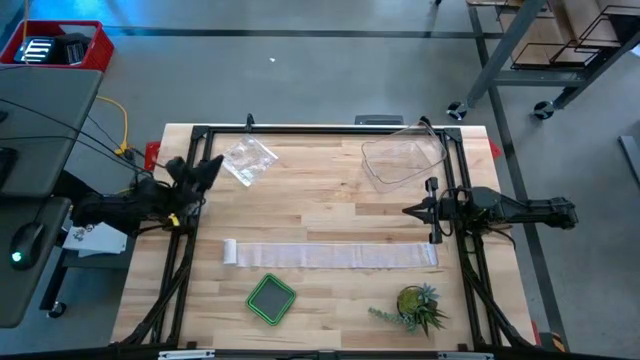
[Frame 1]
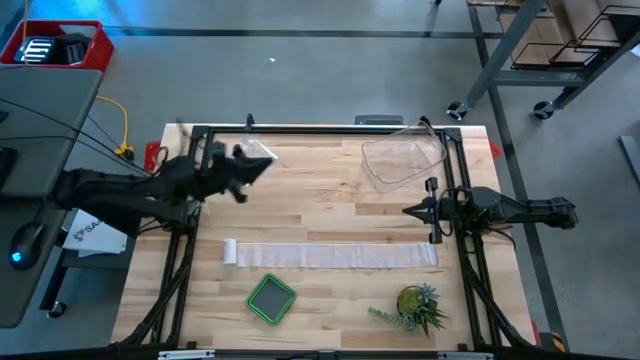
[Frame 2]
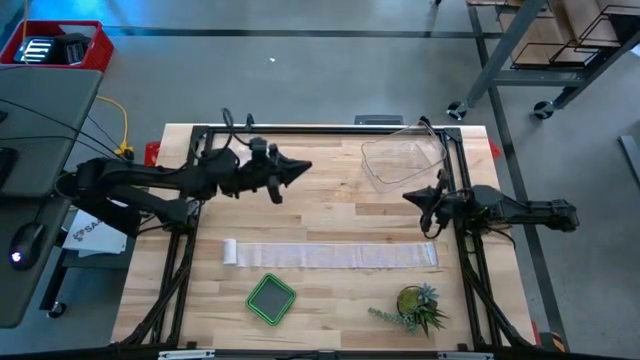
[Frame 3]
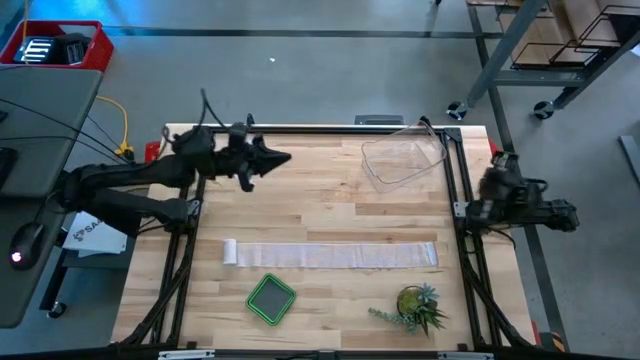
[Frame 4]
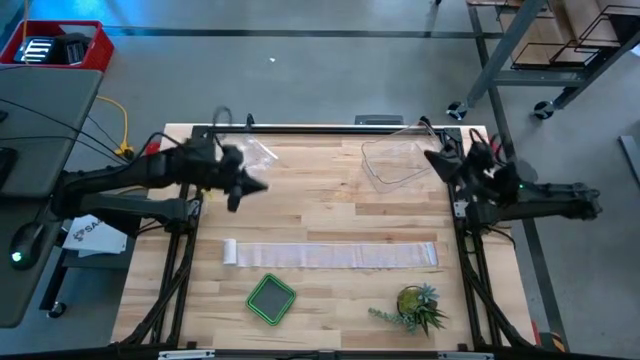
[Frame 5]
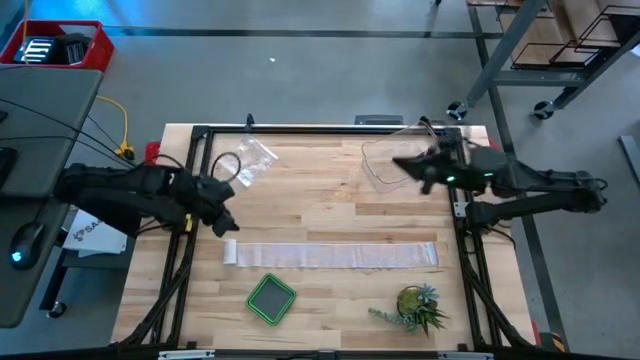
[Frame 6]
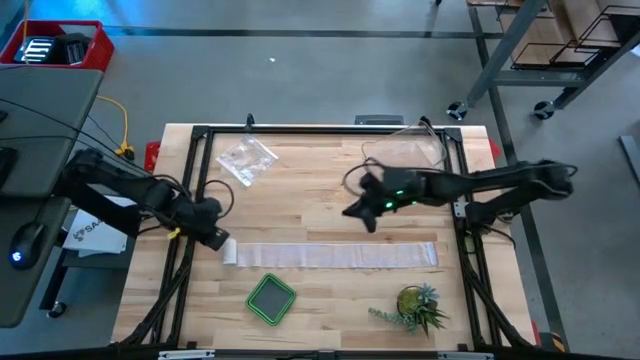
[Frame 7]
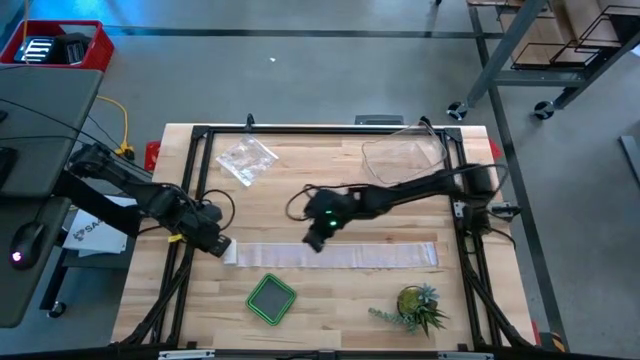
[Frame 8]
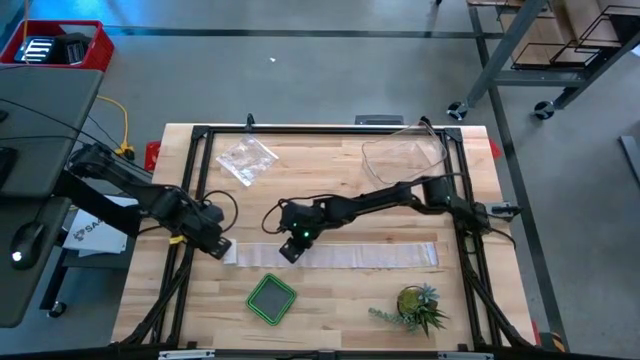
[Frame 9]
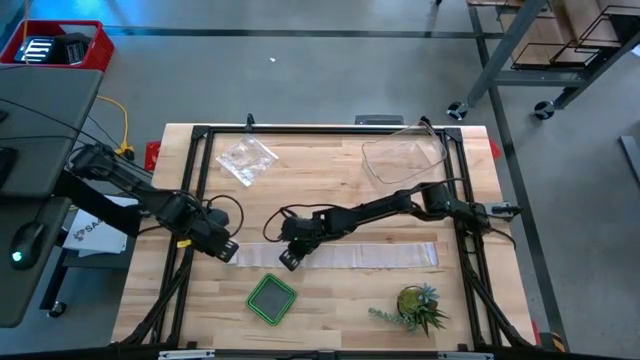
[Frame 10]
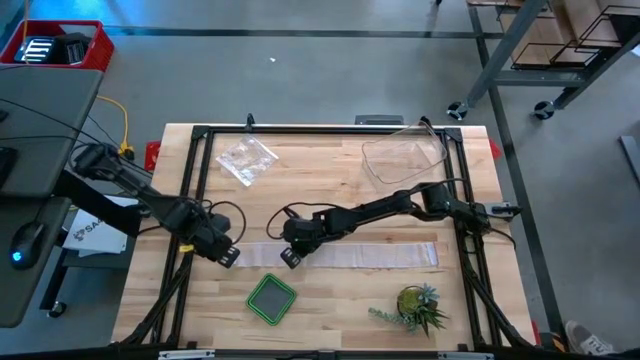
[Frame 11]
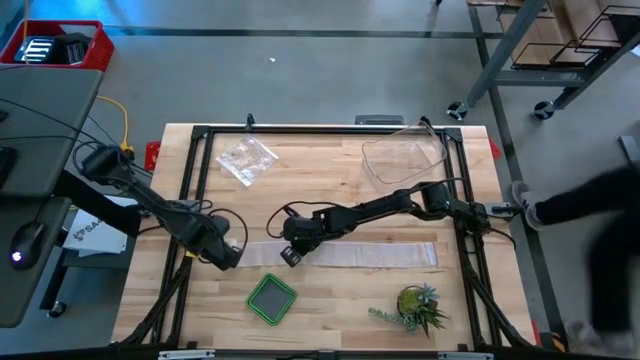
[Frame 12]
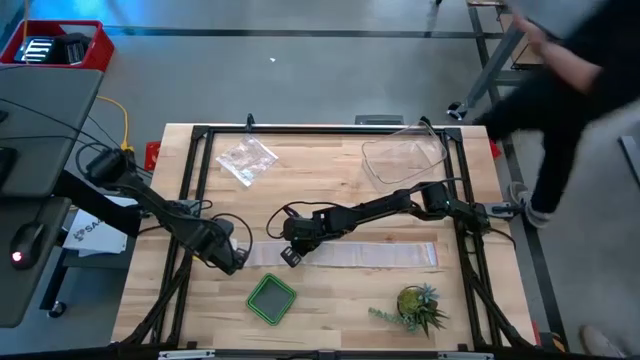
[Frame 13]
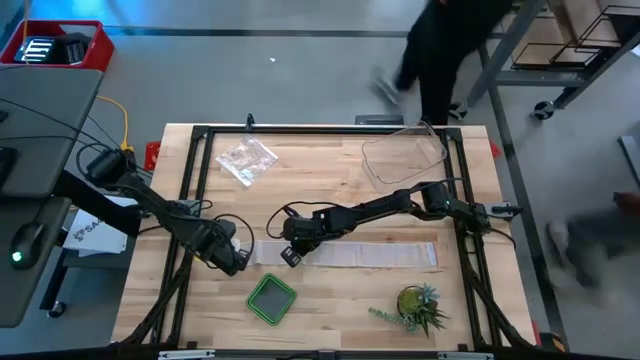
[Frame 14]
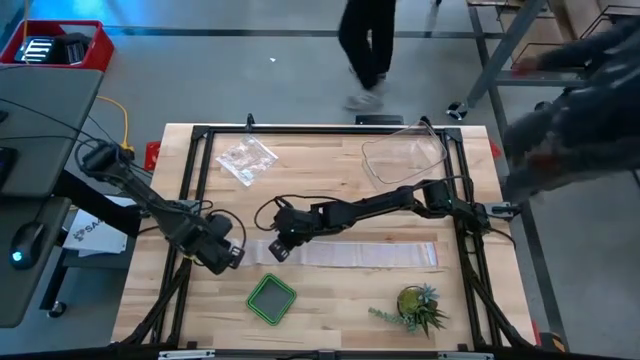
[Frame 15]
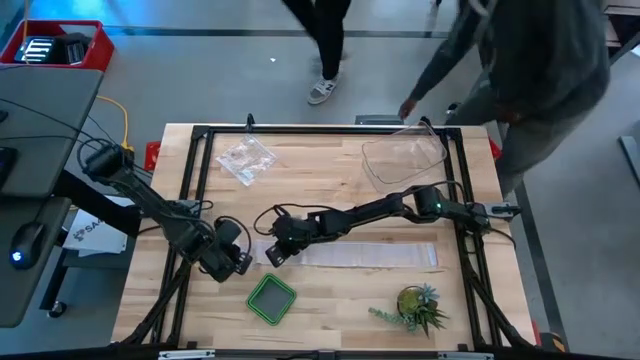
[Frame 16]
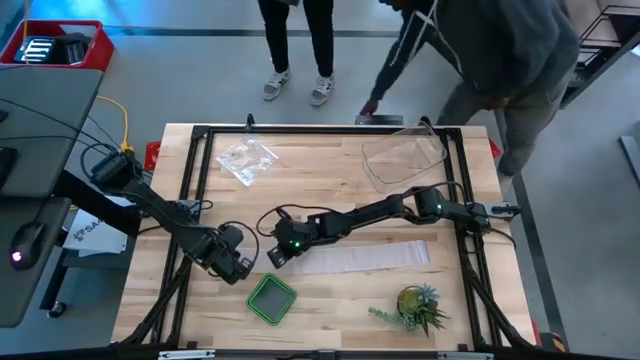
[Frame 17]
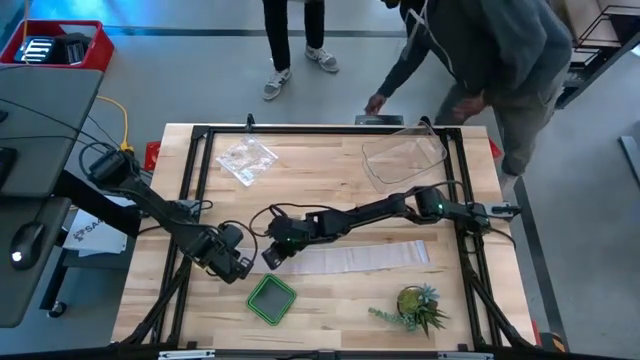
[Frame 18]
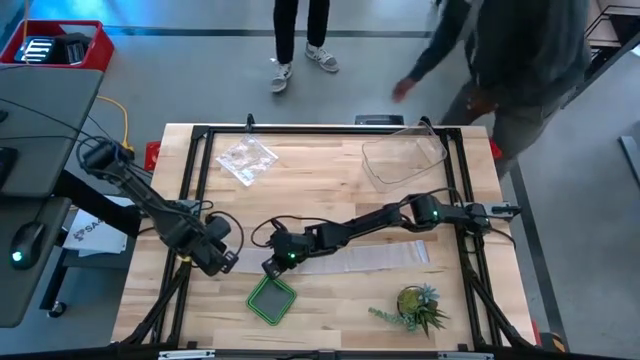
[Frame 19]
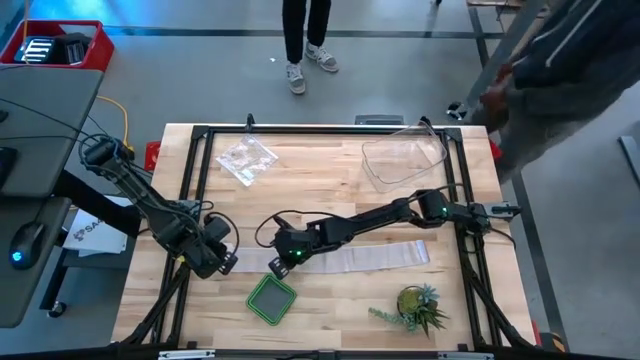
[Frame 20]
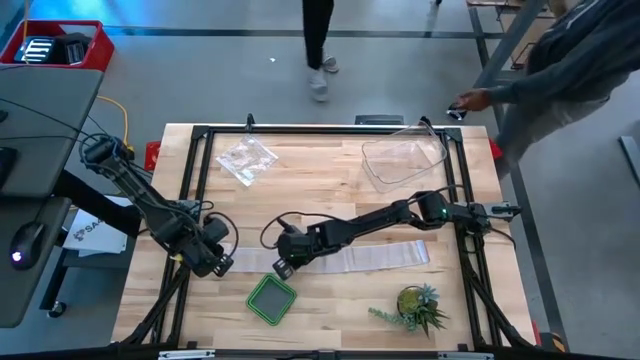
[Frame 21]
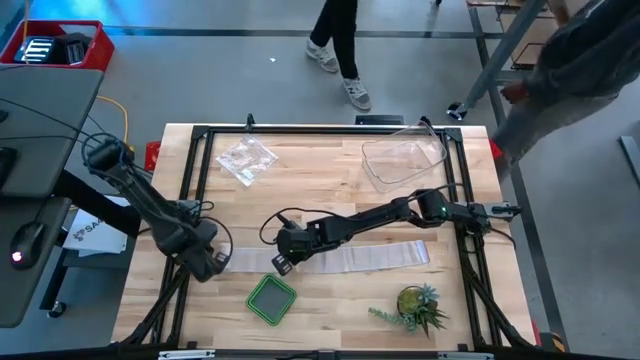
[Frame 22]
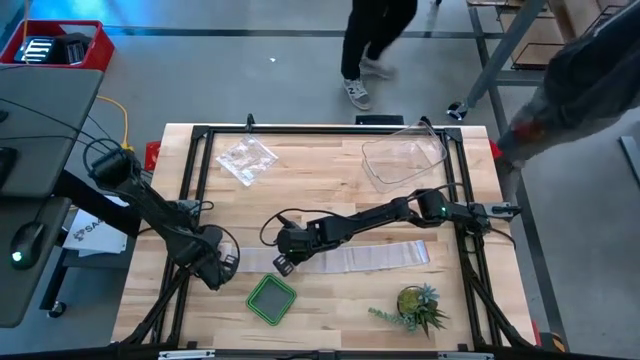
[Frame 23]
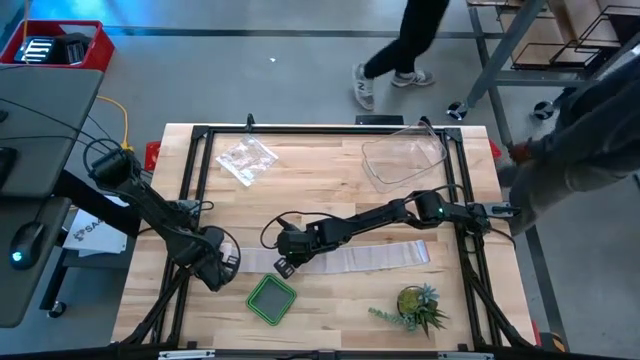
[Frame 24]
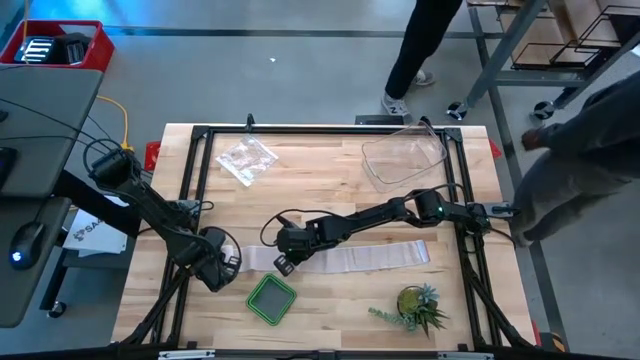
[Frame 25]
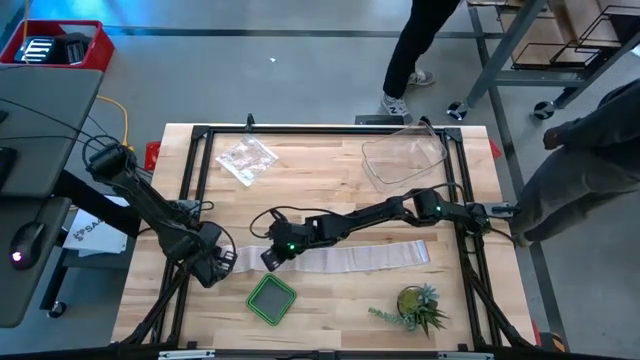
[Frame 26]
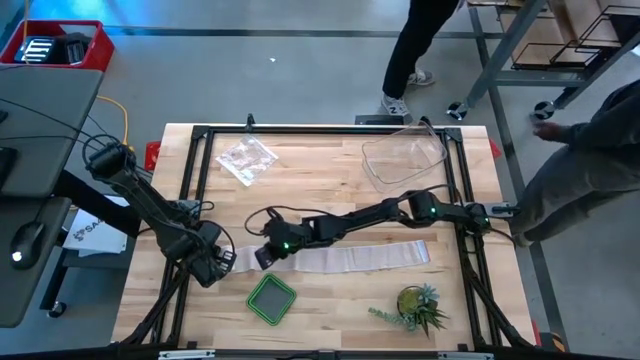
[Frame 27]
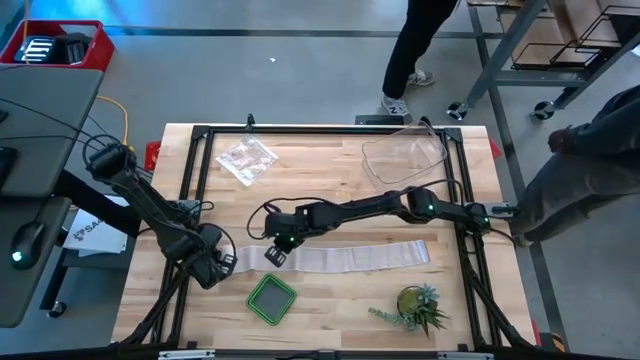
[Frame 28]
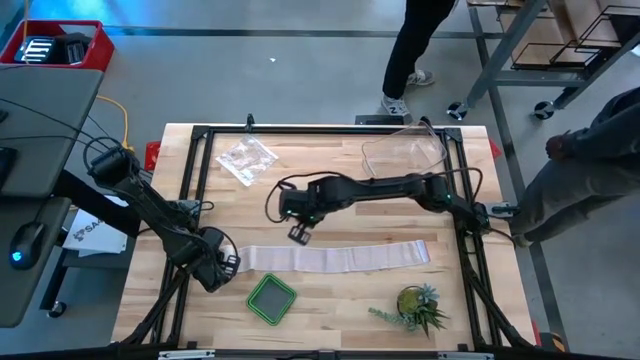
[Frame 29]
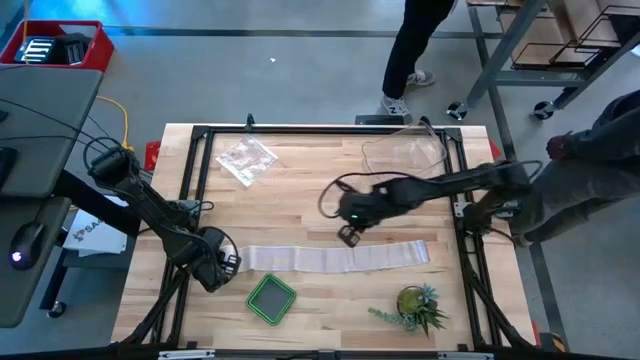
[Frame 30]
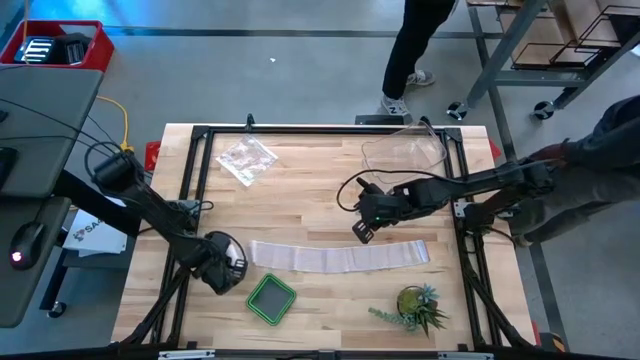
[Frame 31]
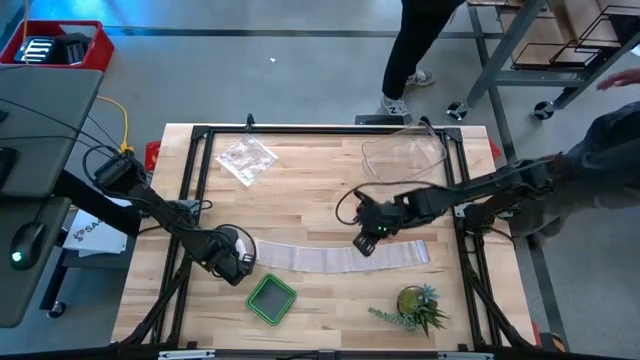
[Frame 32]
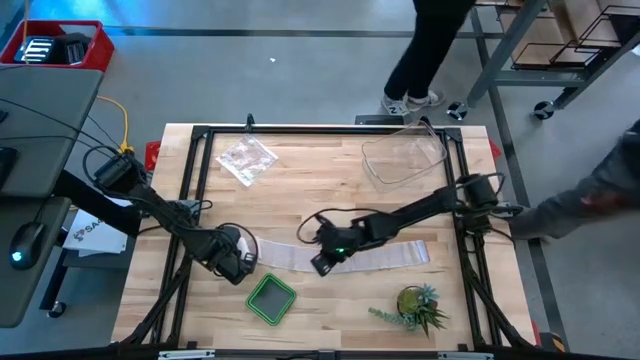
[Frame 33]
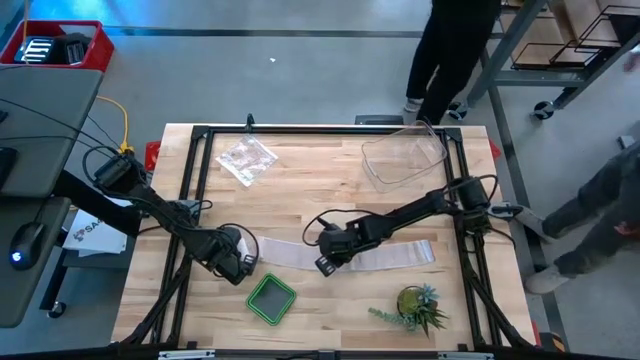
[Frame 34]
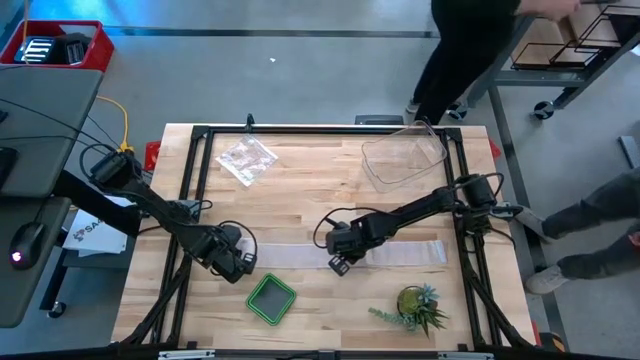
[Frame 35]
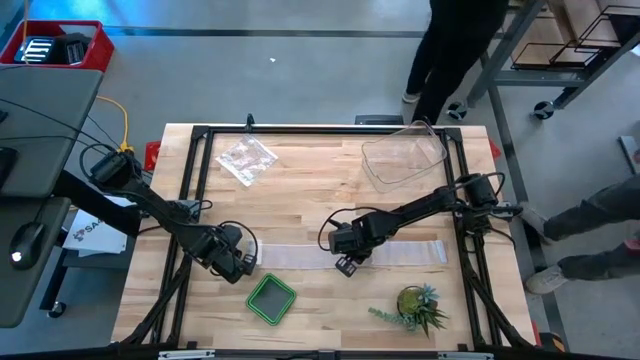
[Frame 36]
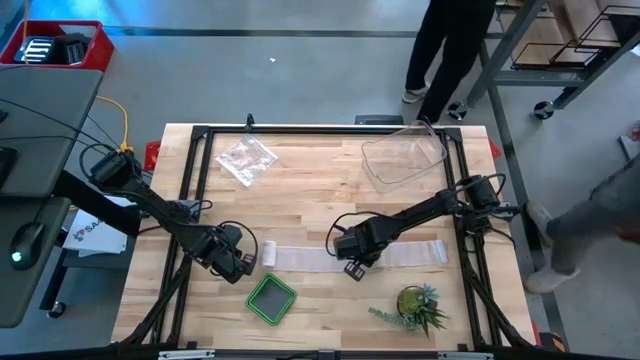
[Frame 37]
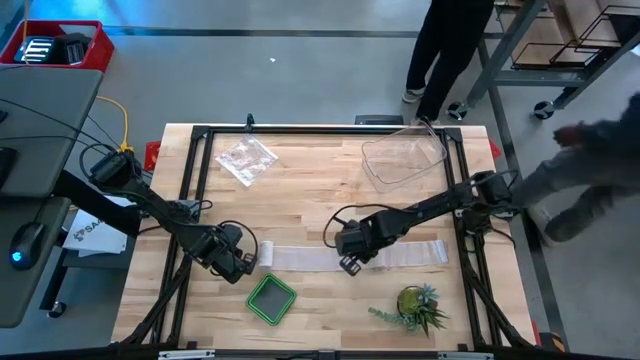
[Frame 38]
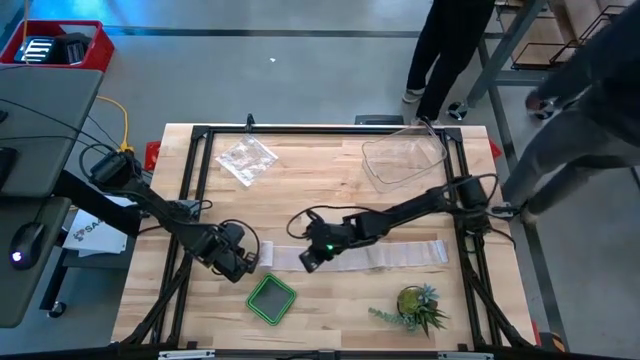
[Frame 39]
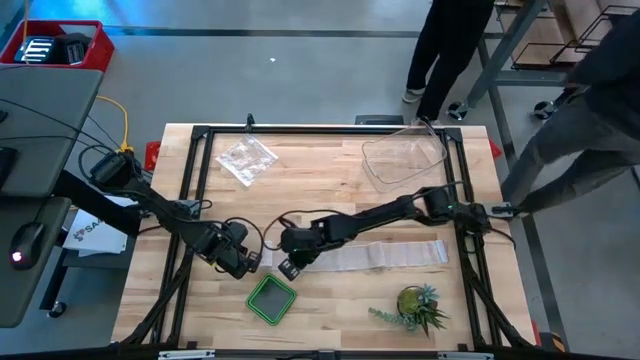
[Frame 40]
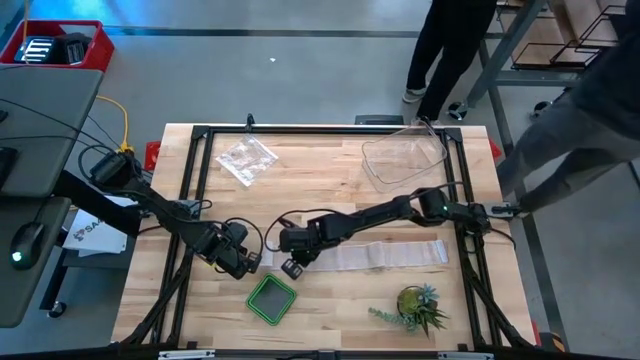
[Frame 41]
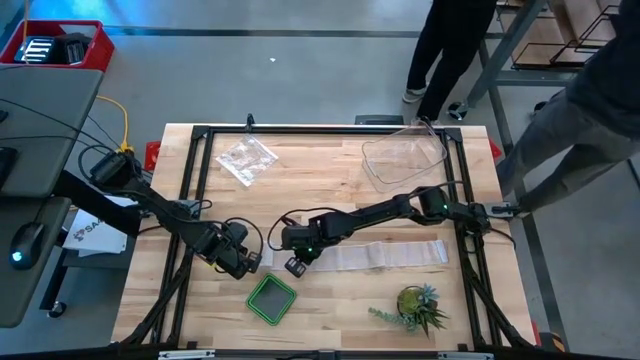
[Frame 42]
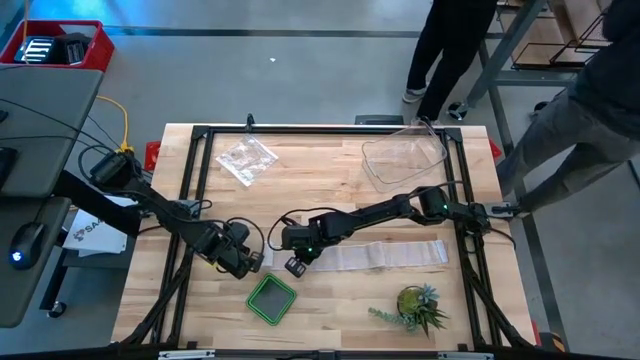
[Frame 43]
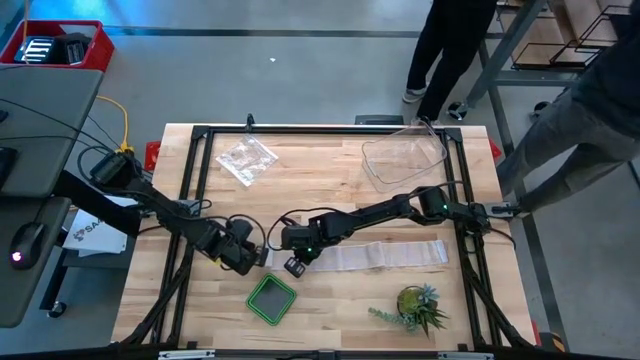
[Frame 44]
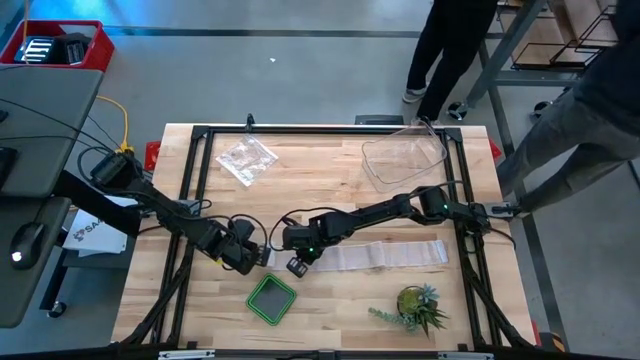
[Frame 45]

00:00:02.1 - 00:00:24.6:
Task: Roll bandage
Roll the white bandage
